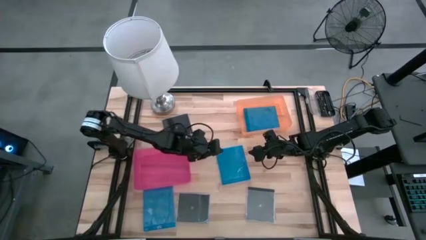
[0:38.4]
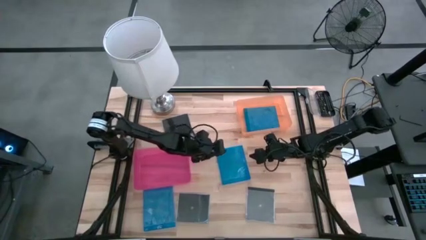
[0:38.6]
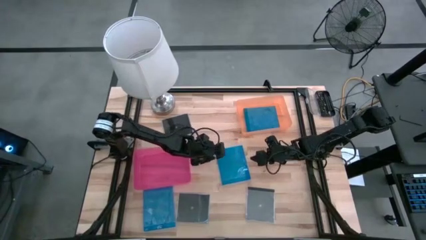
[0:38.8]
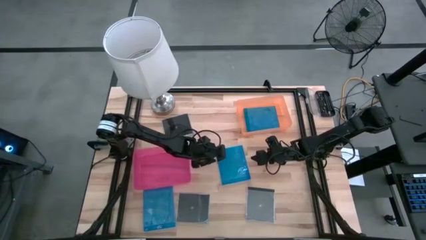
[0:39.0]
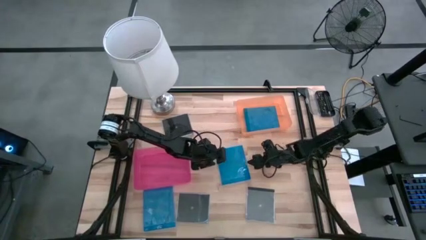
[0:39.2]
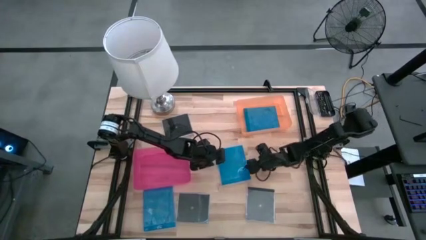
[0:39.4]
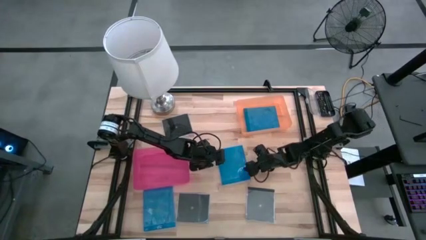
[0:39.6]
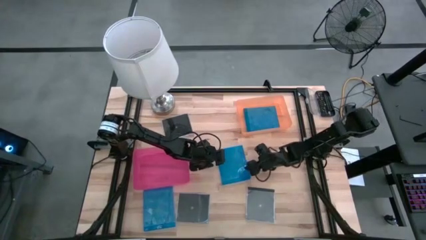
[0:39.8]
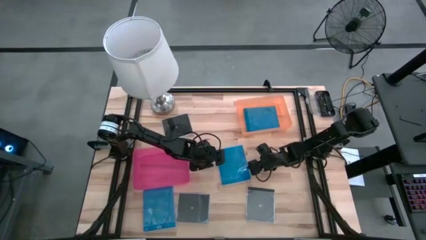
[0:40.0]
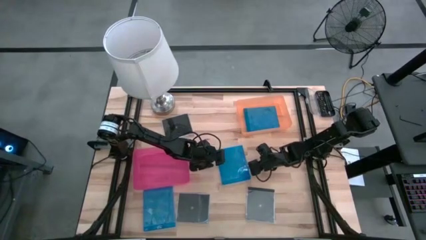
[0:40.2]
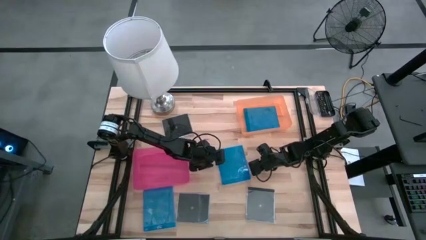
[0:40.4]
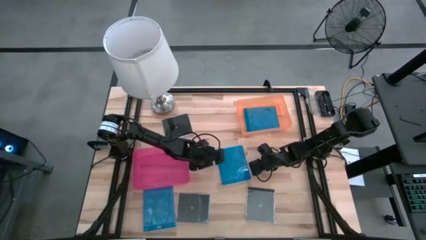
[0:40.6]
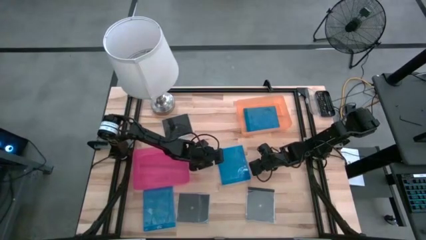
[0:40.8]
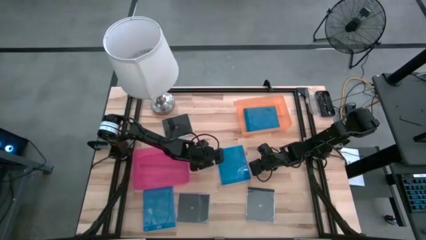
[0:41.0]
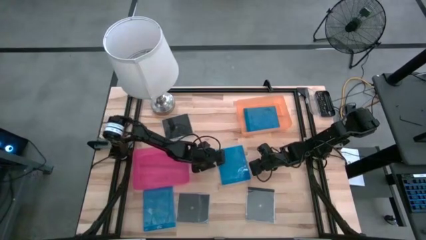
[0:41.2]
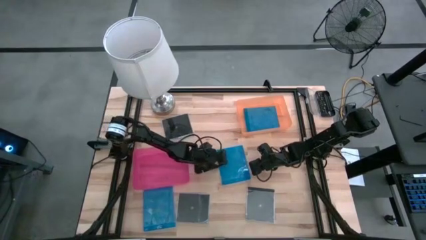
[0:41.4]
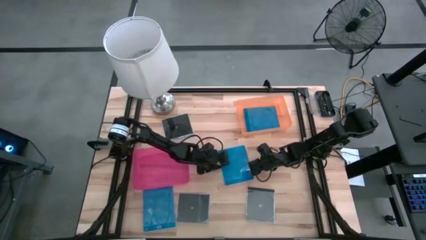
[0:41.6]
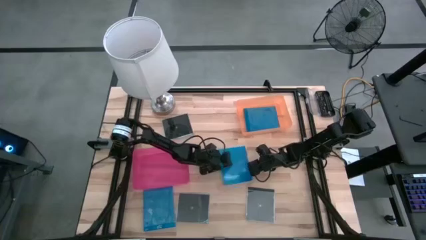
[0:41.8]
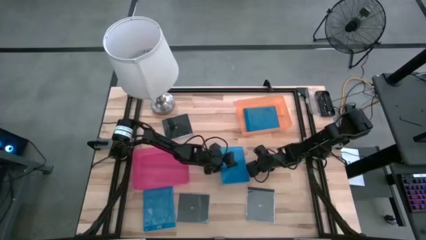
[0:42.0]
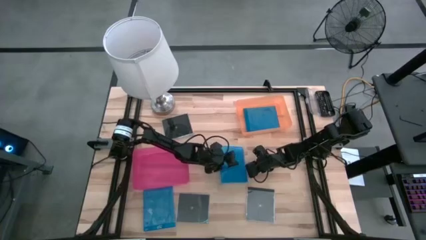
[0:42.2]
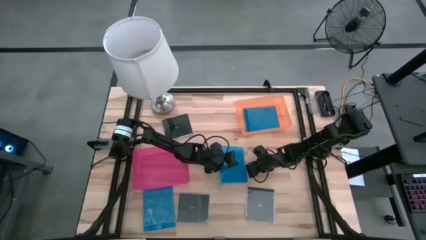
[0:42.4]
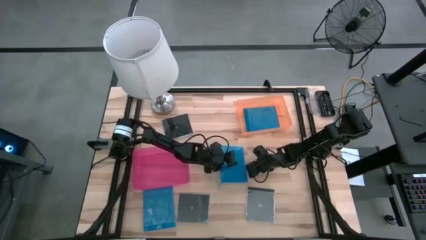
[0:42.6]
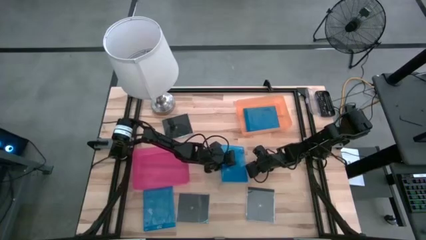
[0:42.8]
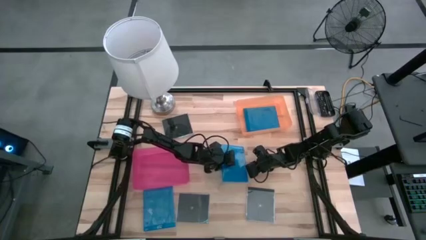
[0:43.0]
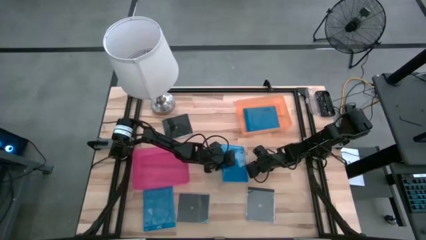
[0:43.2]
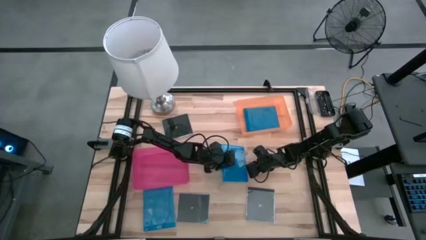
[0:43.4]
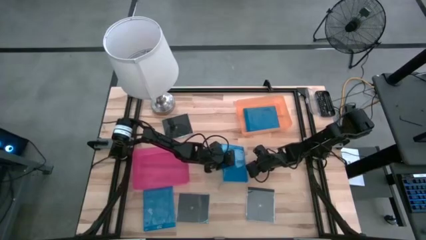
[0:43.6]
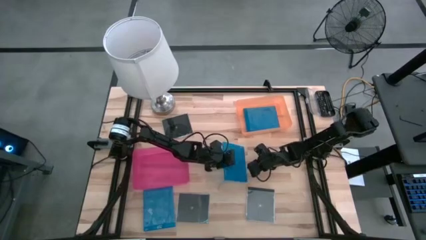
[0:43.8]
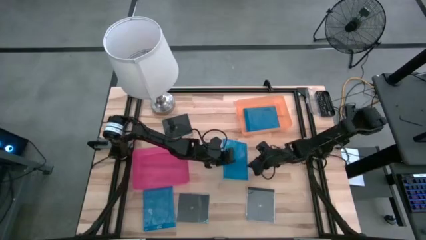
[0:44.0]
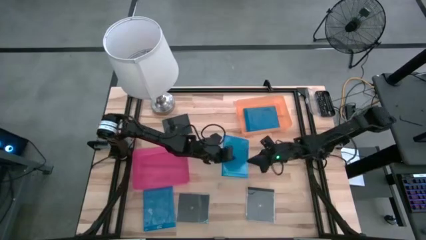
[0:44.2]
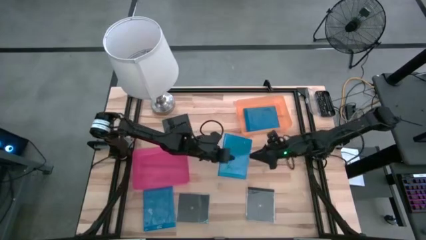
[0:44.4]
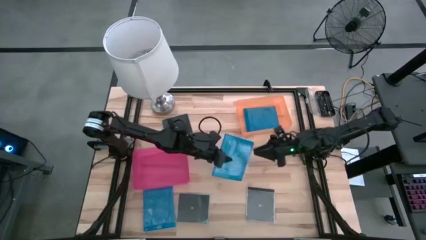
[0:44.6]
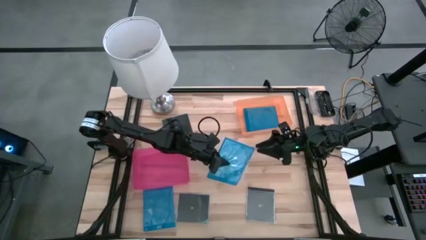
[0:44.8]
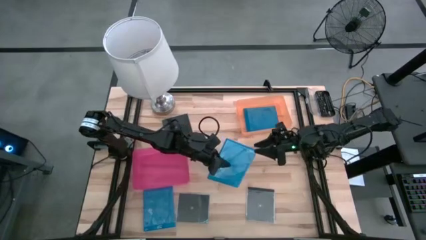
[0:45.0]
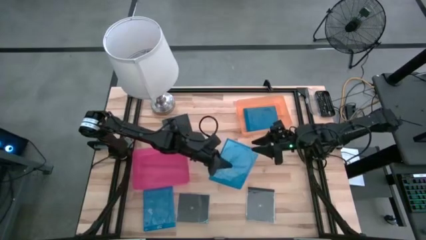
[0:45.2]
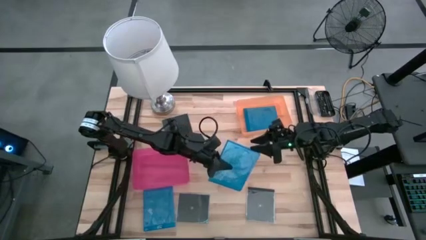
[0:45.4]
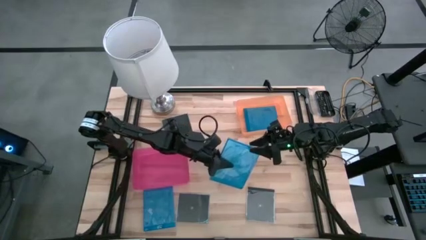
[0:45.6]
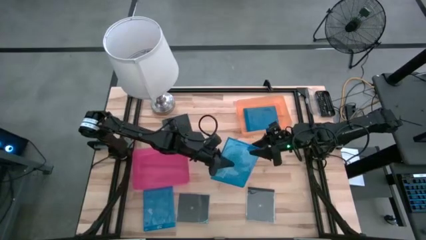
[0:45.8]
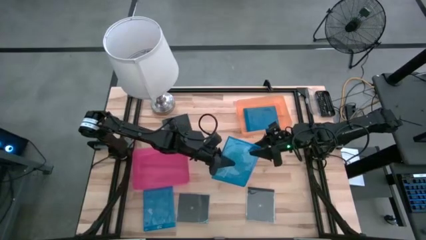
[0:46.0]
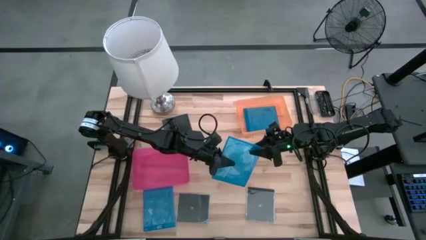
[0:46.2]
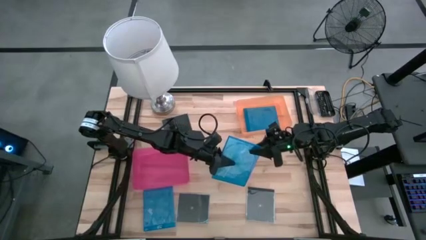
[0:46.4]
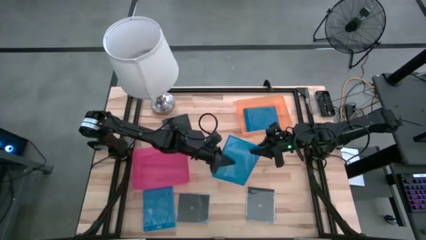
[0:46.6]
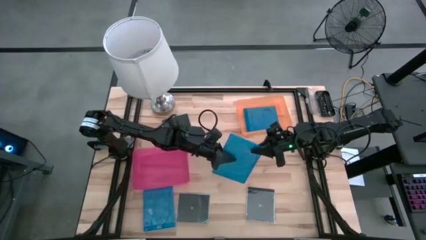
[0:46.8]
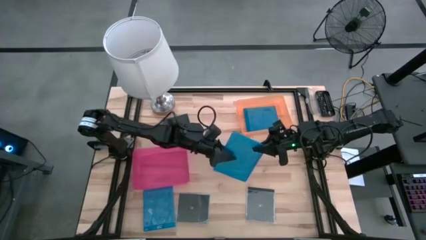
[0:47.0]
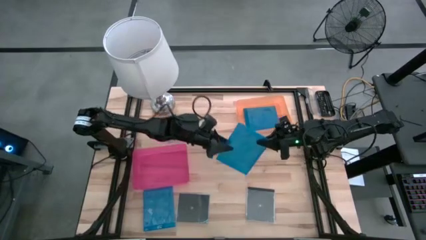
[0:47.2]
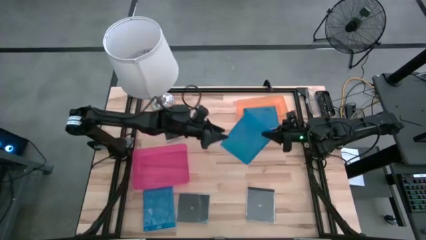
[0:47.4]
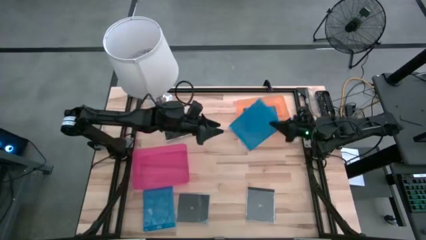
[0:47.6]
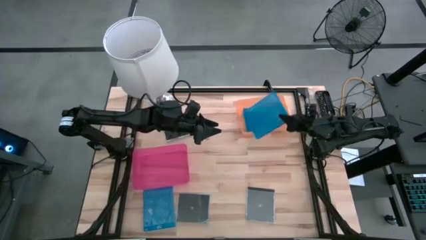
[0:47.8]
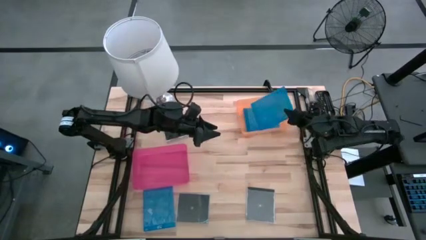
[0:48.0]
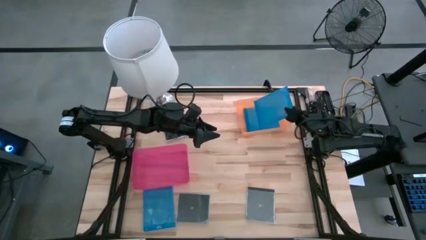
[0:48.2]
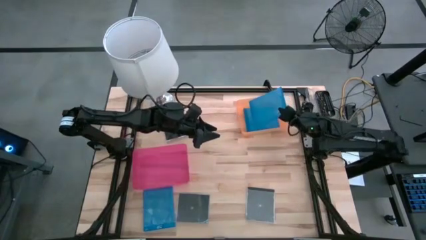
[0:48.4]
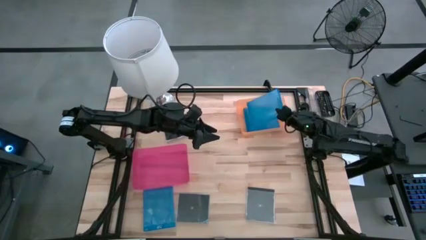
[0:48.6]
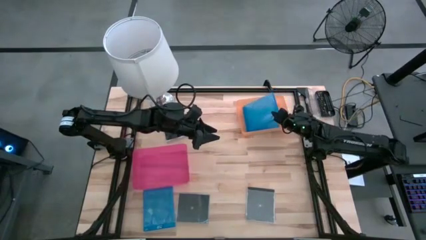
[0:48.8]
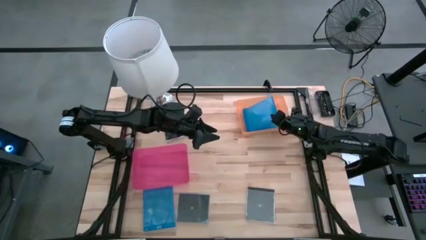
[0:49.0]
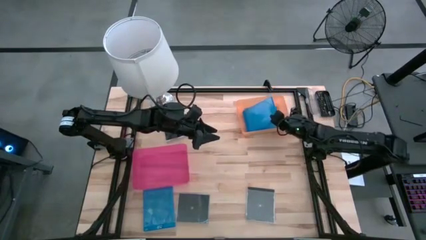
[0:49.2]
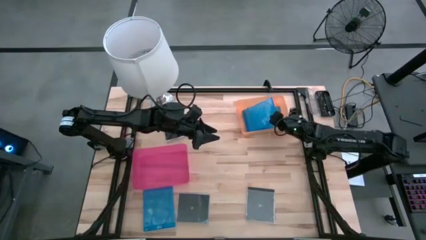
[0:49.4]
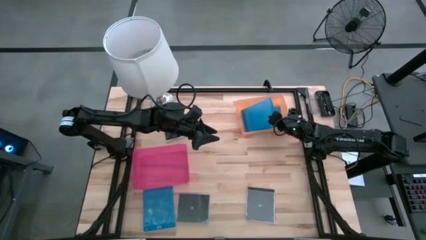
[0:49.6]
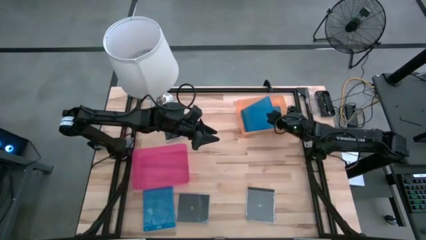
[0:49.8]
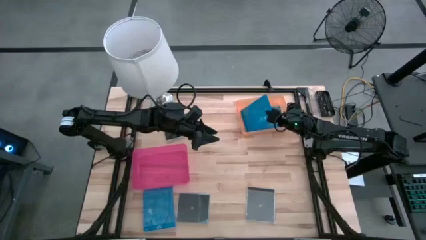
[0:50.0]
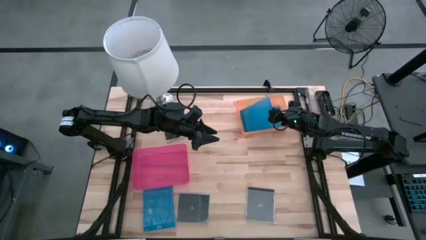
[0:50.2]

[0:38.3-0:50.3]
Task: Pick & place jewel cases by type
Put the top blue CD case into the orange bin
